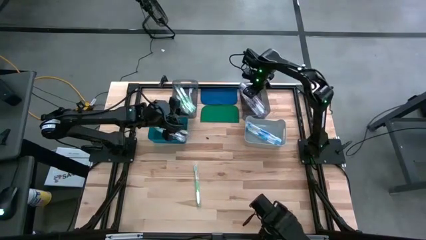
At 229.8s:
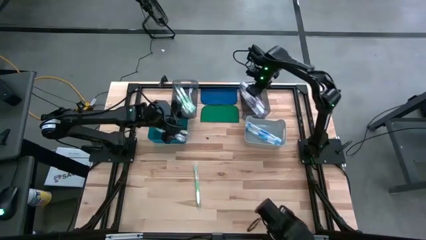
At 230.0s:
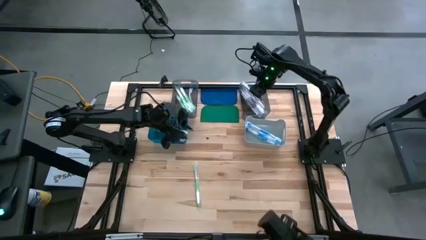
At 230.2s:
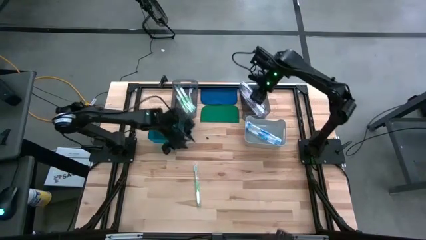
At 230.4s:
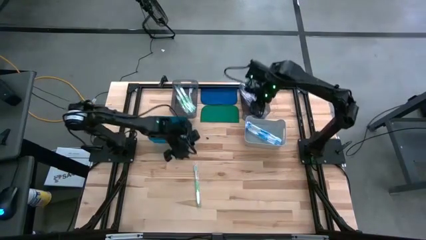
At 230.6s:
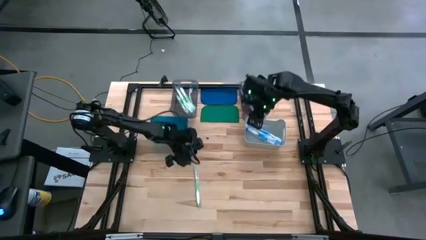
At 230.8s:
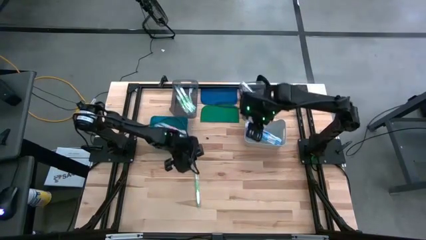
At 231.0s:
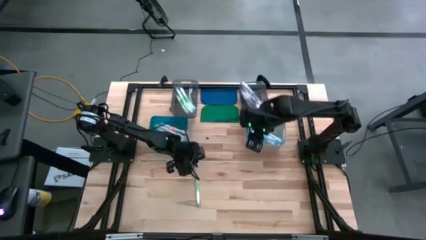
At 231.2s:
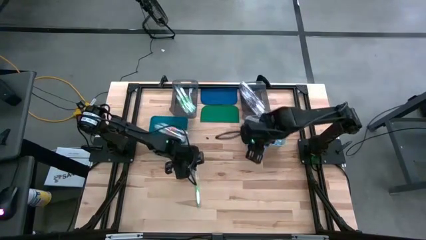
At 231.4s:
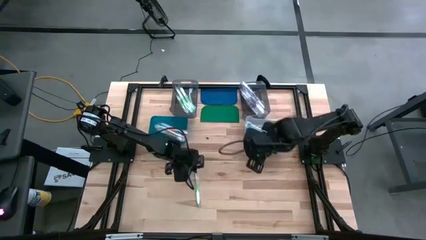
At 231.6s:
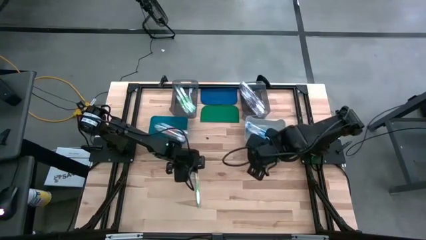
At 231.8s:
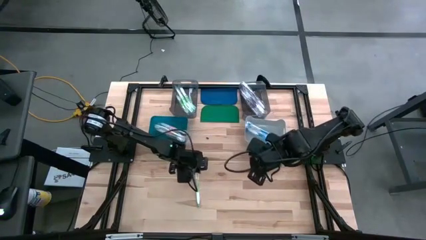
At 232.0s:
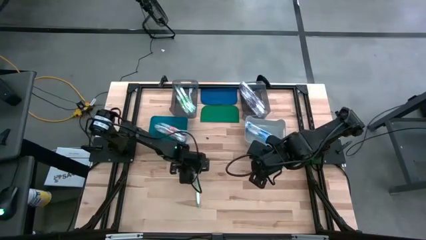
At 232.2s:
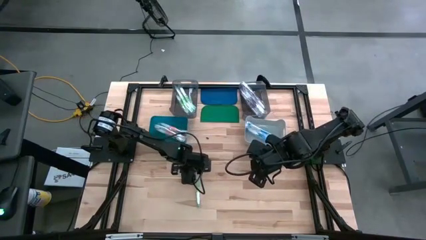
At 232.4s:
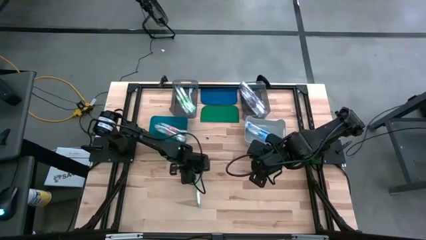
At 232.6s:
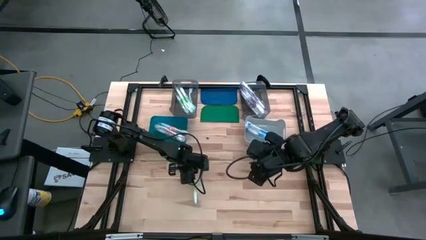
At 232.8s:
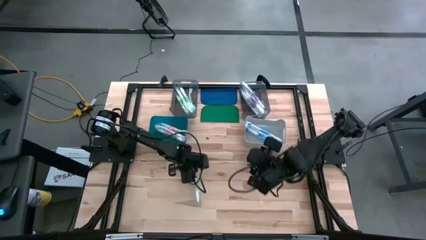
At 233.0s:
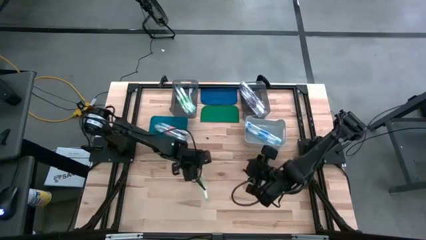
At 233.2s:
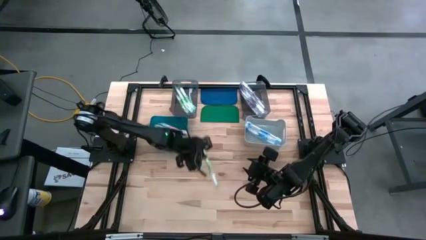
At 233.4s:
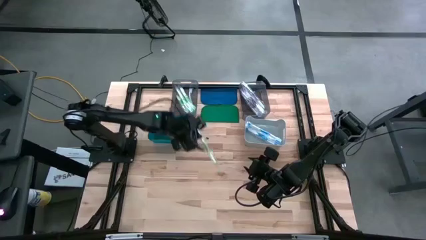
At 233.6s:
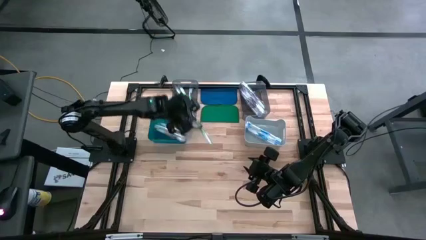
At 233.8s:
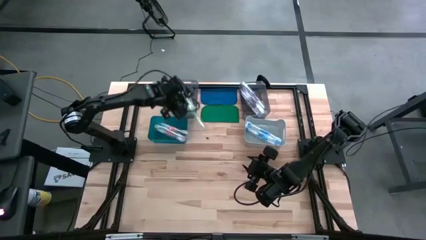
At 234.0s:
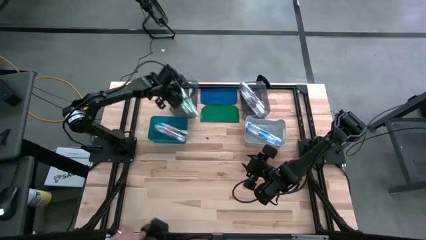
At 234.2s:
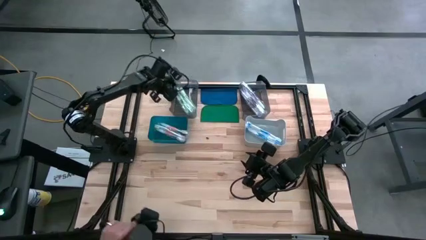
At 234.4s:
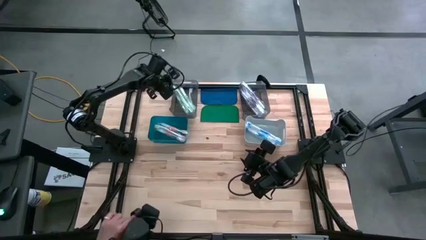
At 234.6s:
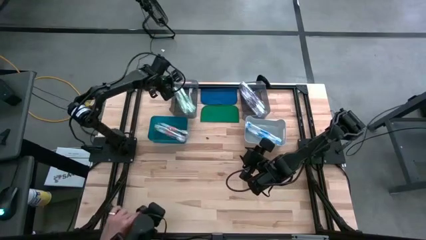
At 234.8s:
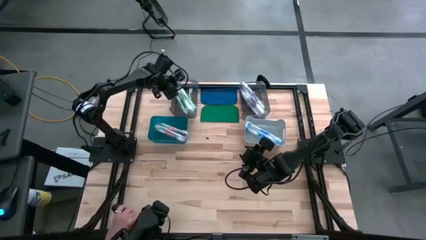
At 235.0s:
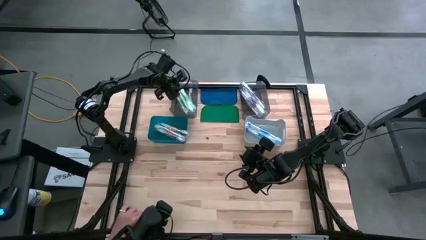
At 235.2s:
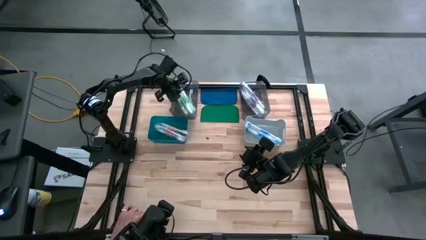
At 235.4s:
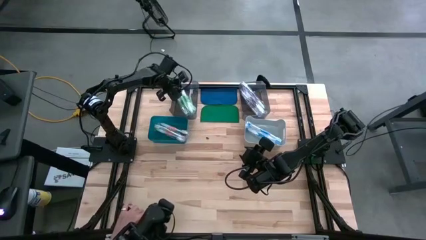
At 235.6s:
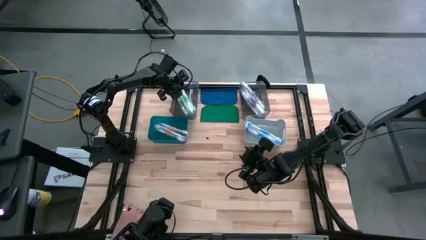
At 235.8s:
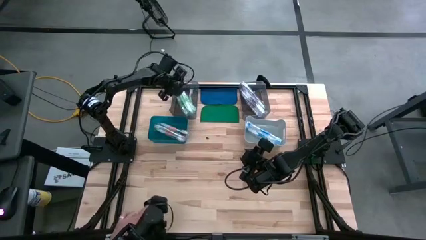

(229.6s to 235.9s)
Task: Pick & Place Toothbrushes
Adjust the green toothbrush in the left black bin

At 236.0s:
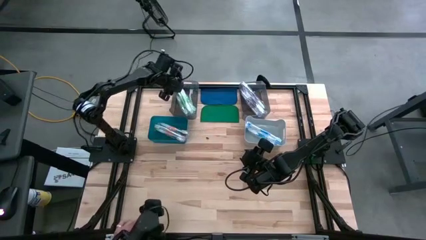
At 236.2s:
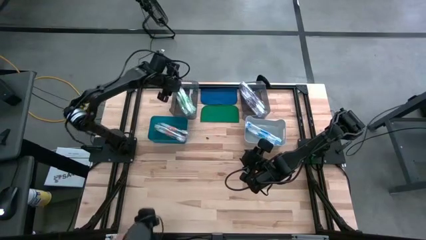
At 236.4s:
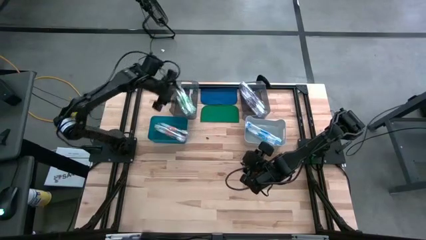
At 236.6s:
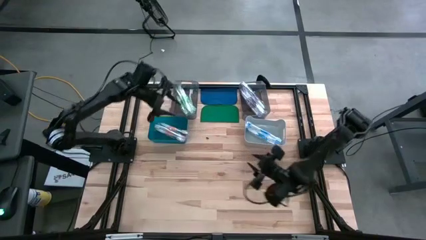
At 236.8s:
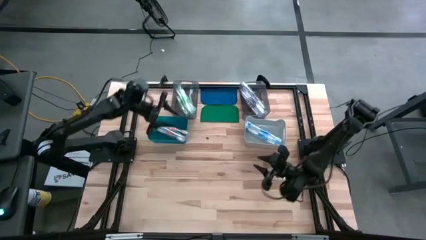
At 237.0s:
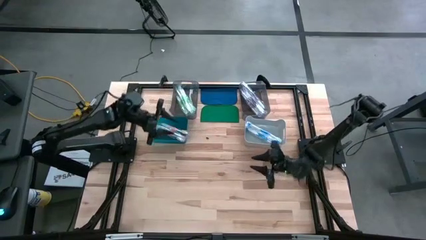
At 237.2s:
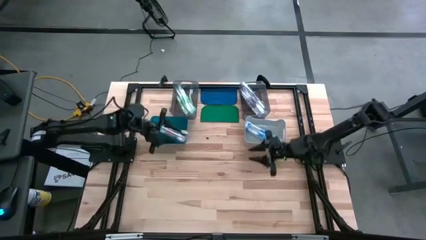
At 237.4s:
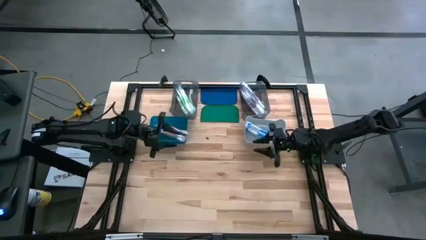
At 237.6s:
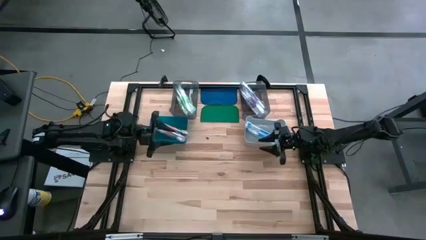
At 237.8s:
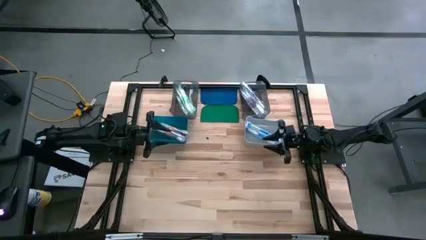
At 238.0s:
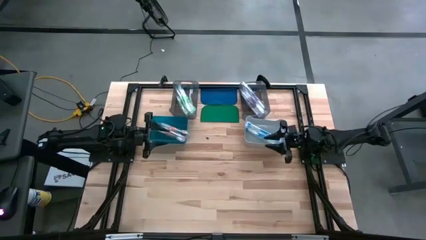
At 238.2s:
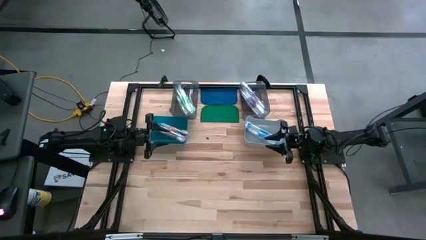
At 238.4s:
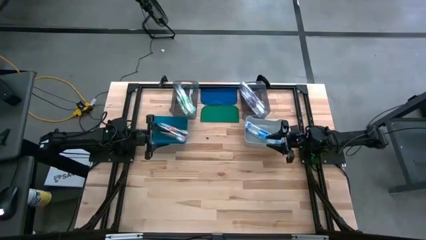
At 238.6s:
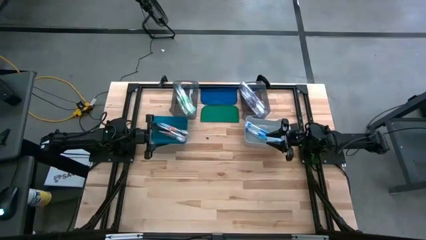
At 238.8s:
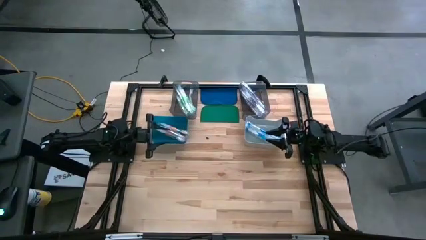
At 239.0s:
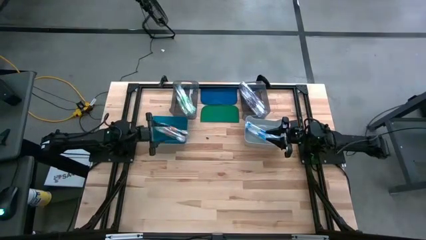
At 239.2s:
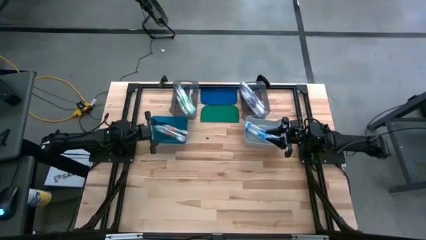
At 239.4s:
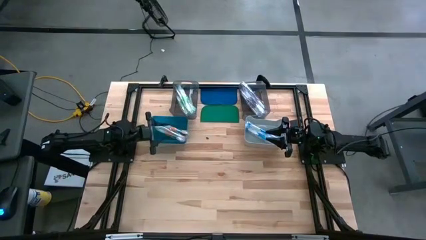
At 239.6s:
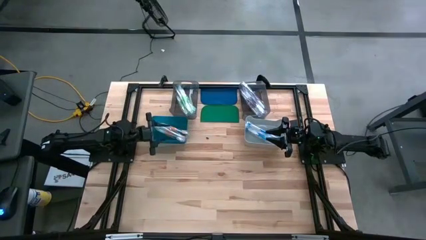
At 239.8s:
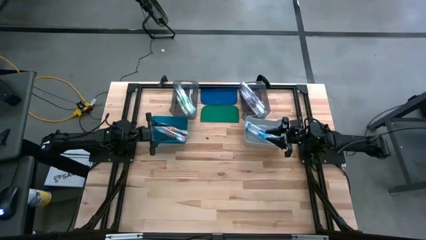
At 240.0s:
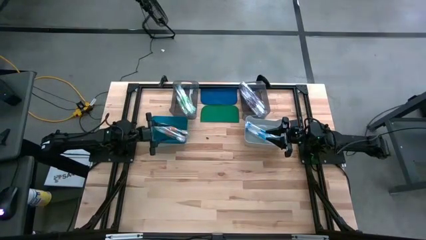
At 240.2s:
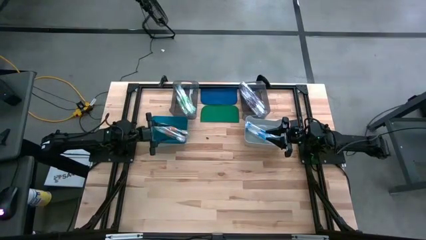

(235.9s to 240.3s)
Return to Home Position
